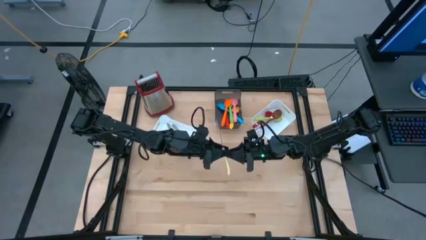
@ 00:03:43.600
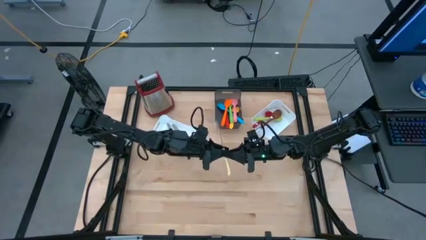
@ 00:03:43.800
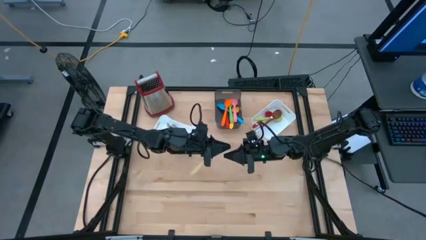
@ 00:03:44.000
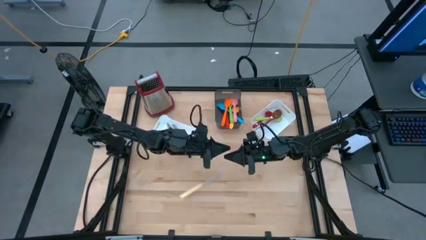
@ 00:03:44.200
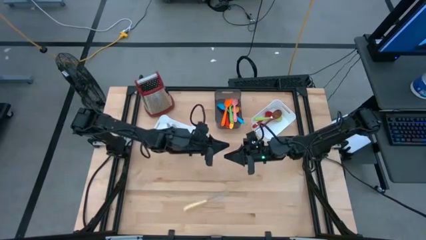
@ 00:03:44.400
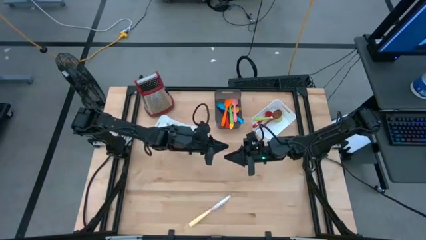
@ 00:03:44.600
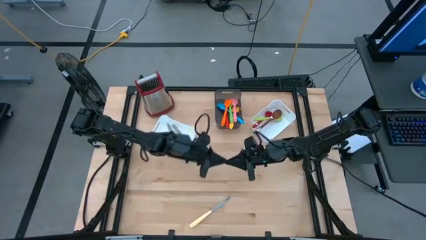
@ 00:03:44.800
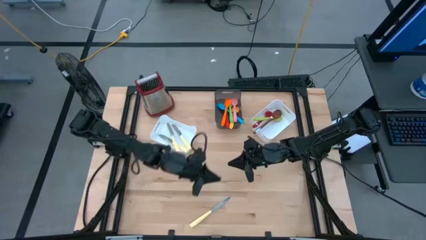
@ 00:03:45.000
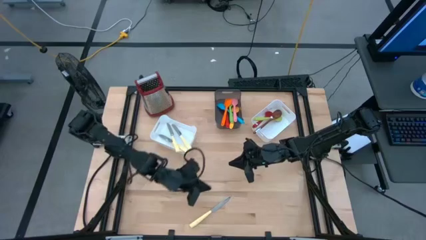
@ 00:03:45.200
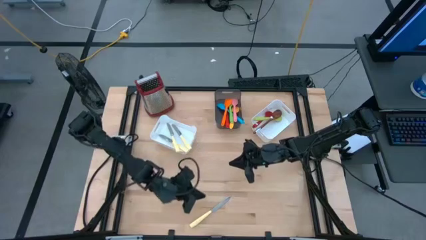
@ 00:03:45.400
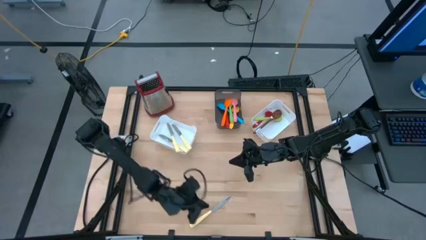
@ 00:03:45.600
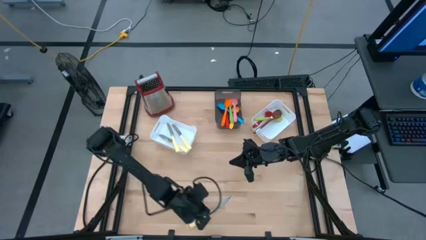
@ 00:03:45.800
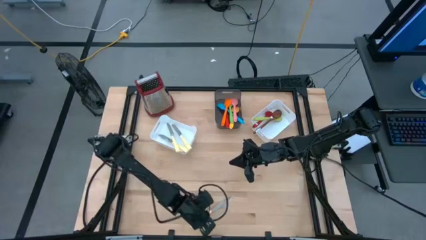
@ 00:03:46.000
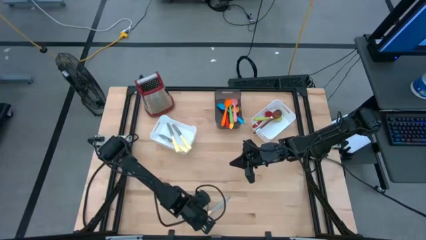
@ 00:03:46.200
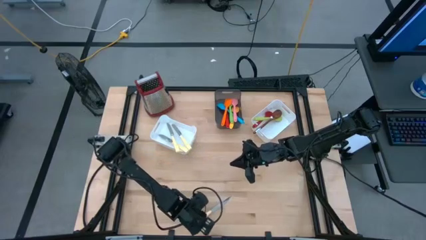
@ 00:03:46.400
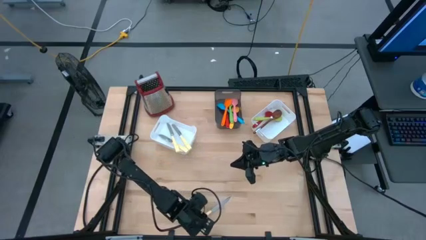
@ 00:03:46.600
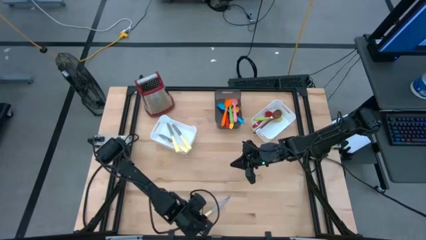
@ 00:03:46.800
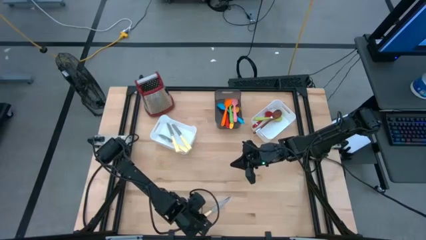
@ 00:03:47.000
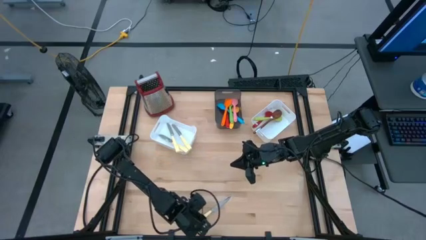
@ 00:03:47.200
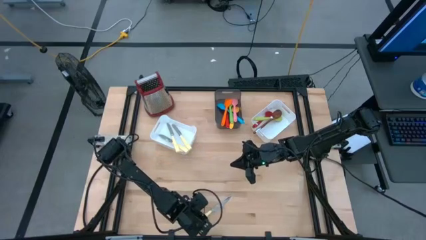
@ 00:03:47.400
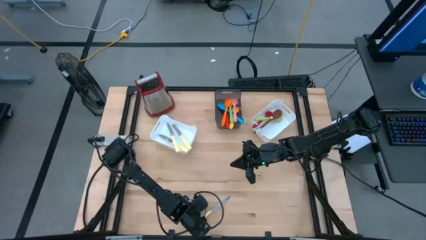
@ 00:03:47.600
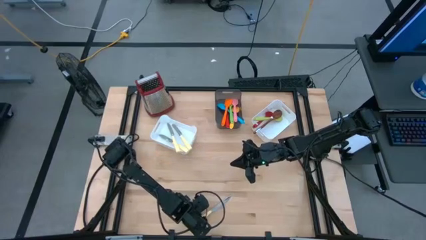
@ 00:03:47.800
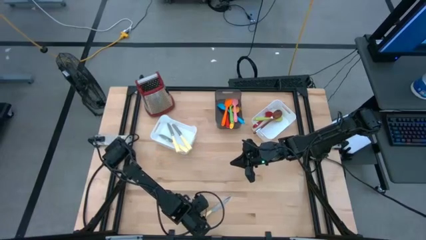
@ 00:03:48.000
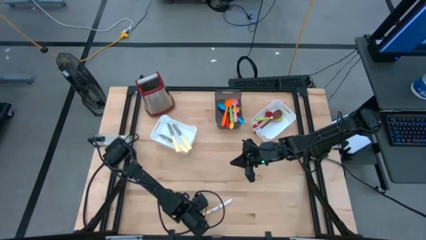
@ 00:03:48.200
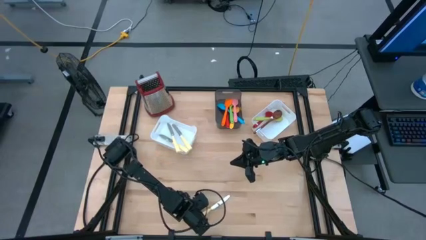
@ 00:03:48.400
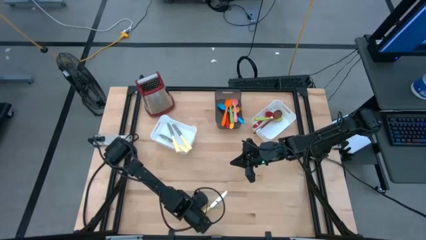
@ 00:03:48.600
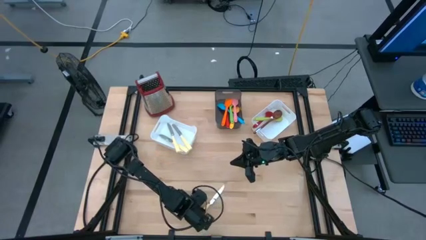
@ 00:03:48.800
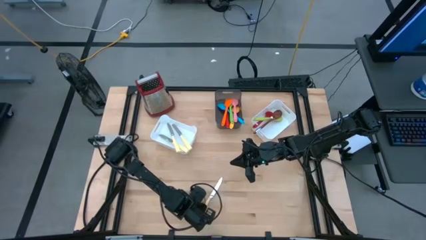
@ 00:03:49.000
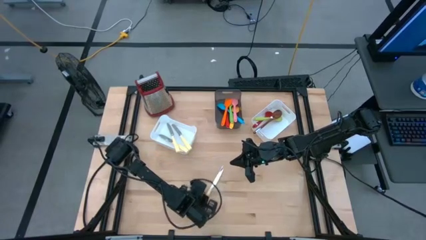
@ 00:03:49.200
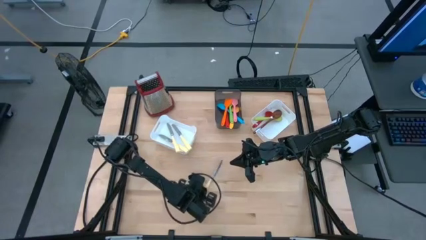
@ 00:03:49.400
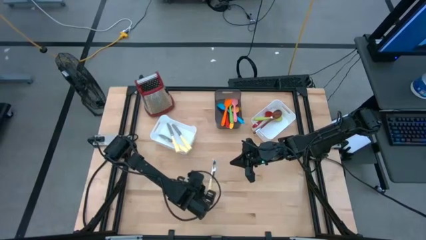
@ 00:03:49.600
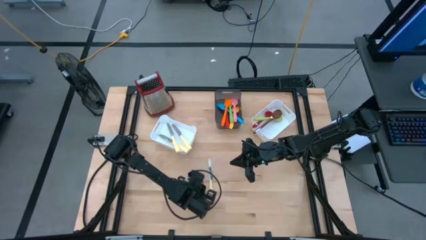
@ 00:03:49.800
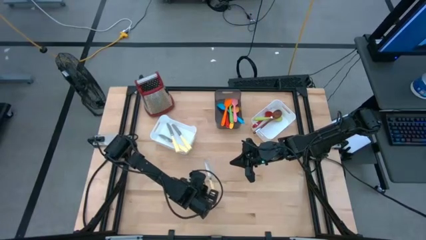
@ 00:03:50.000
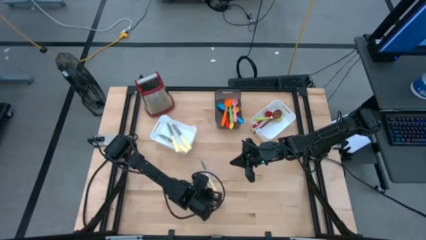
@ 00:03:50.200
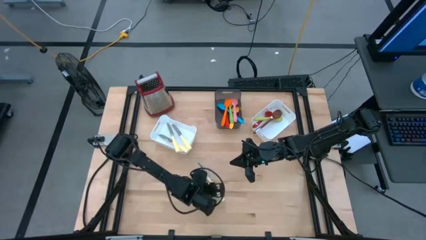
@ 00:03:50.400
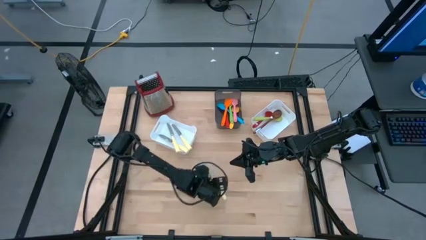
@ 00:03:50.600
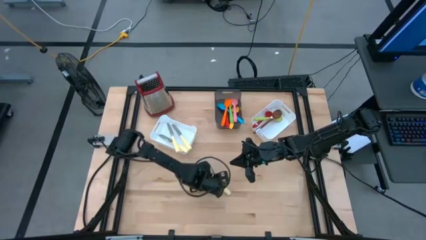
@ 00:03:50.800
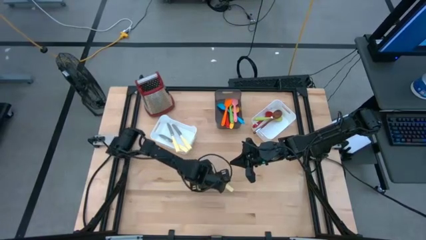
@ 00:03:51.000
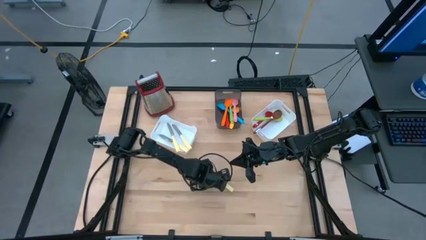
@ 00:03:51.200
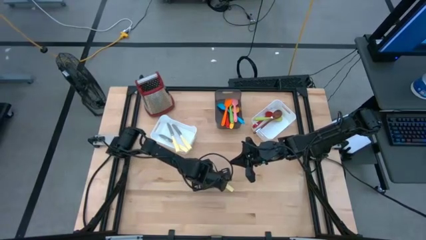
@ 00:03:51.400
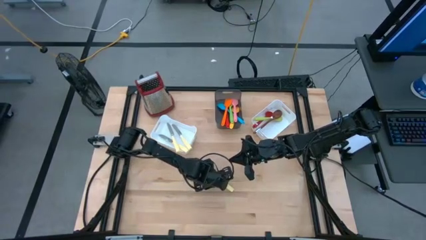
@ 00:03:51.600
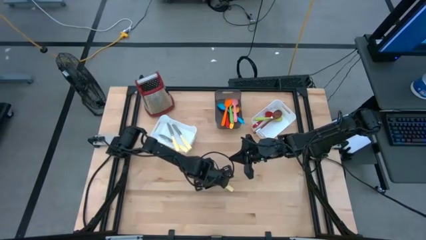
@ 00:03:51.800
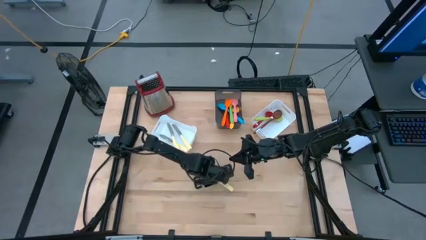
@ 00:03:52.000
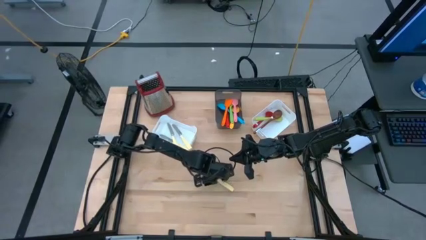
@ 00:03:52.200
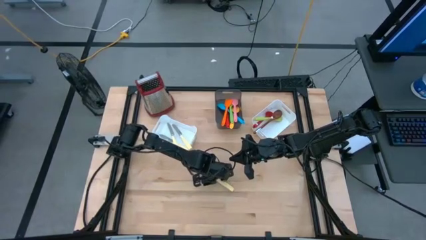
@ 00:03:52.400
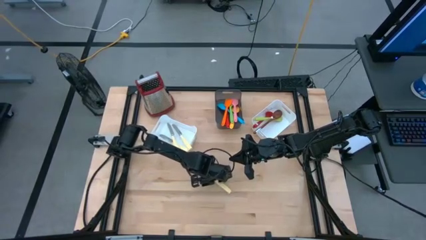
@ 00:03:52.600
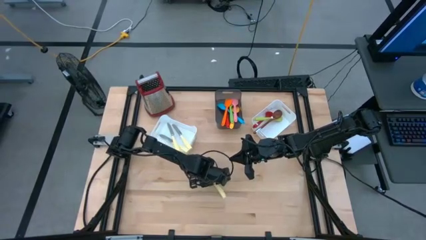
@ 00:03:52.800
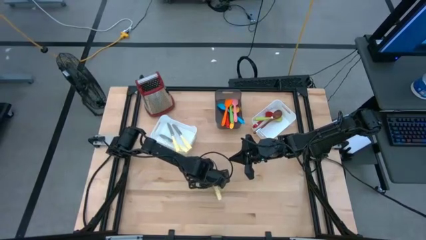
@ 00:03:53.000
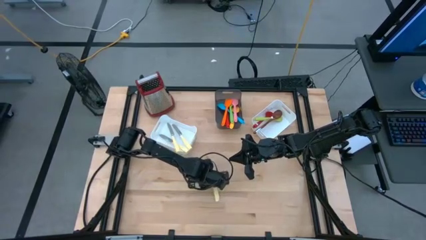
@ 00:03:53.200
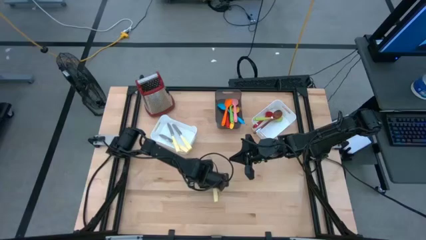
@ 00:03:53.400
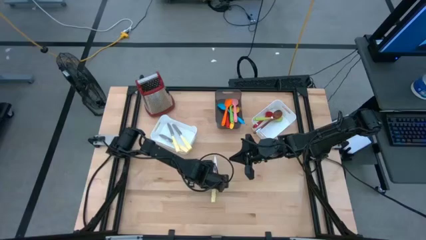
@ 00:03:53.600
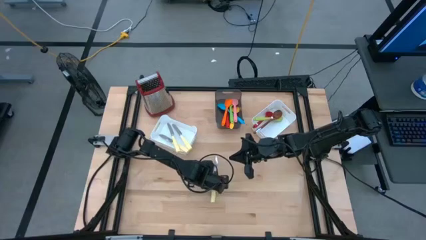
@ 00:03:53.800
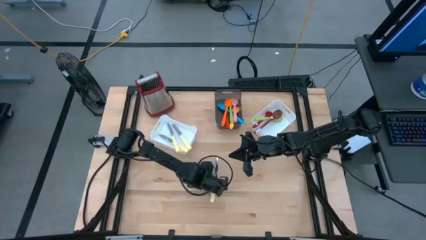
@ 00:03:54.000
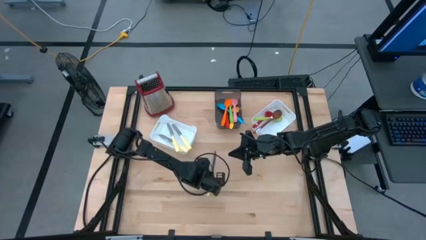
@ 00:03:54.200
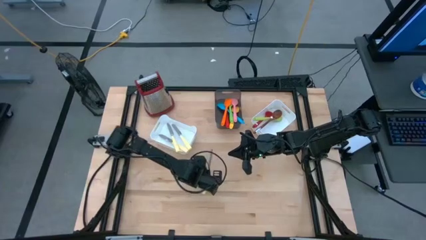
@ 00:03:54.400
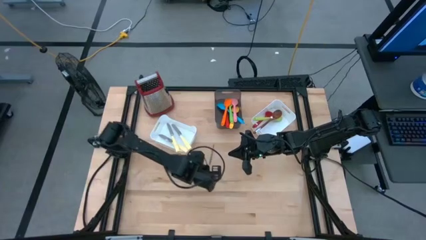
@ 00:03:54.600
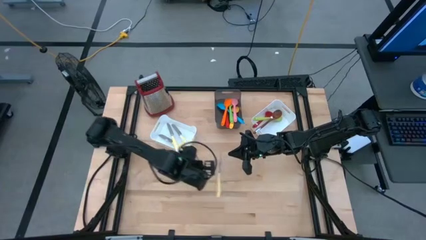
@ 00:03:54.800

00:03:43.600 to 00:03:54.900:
Task: Pick & Place Kitchen Items
Put the yellow knife into the left white bin
